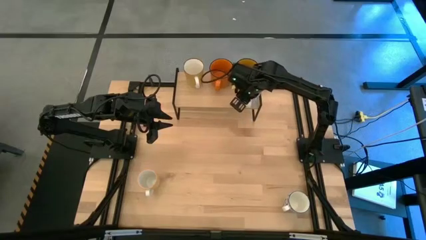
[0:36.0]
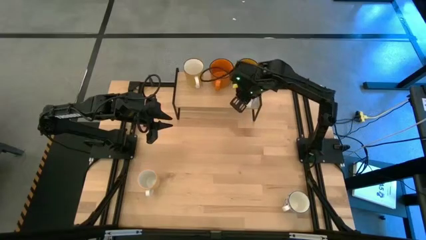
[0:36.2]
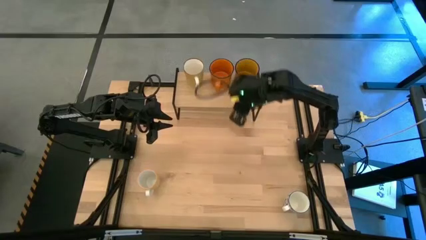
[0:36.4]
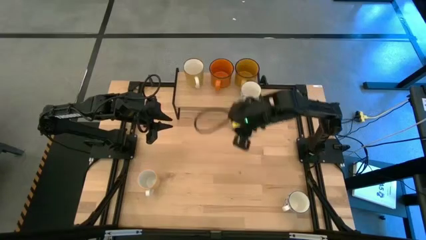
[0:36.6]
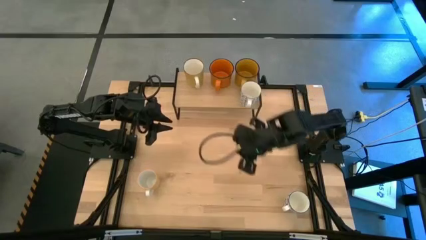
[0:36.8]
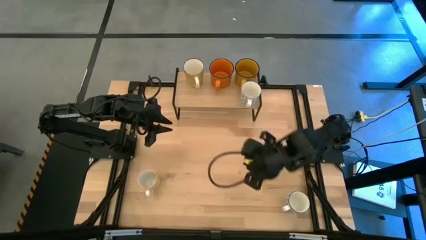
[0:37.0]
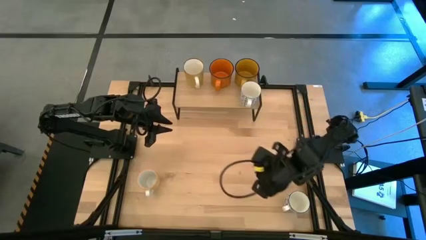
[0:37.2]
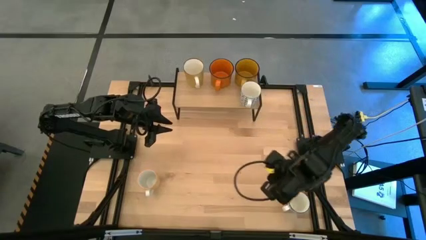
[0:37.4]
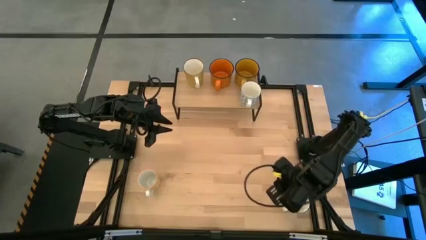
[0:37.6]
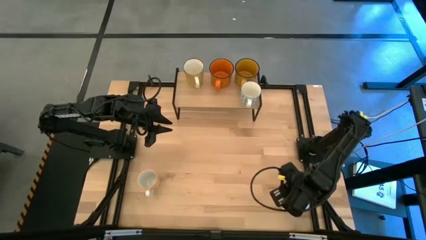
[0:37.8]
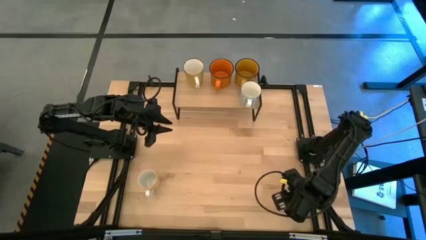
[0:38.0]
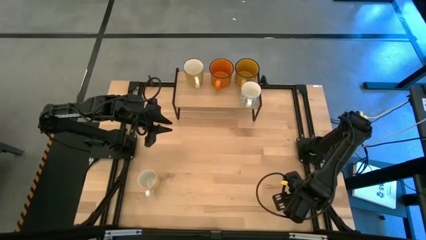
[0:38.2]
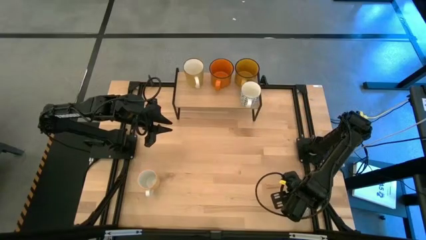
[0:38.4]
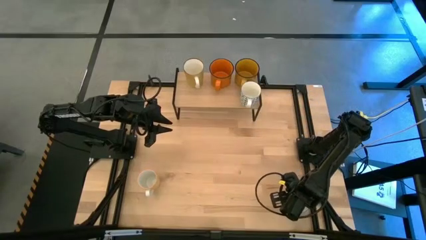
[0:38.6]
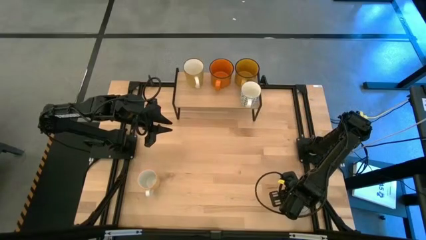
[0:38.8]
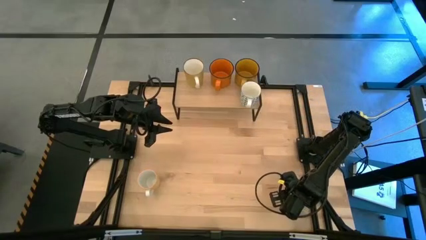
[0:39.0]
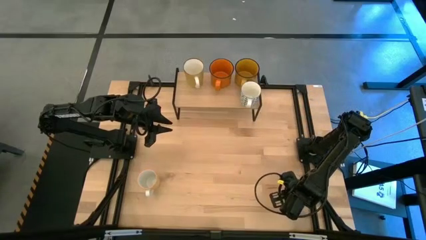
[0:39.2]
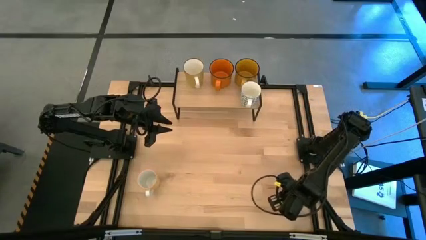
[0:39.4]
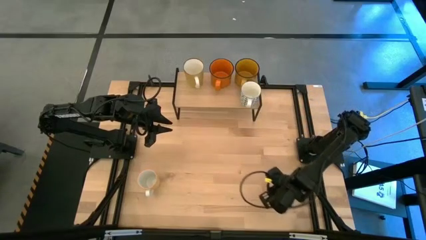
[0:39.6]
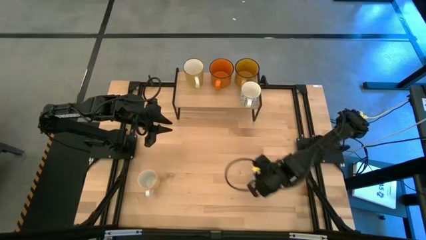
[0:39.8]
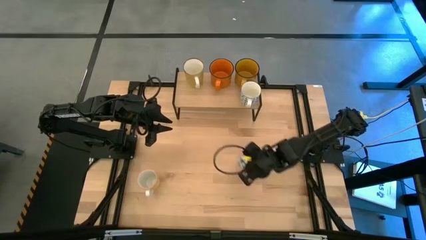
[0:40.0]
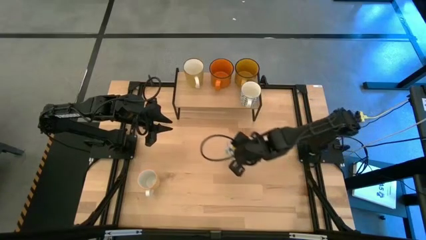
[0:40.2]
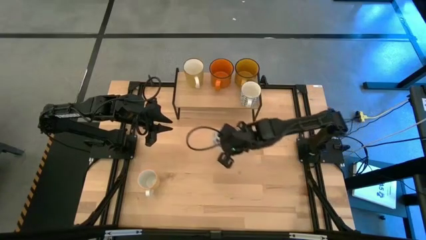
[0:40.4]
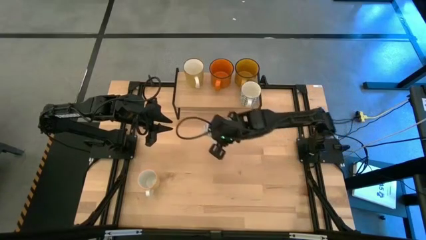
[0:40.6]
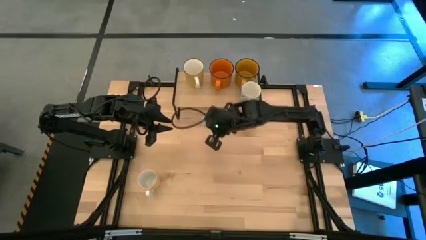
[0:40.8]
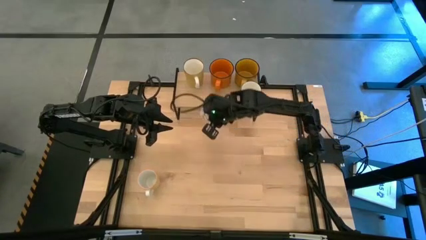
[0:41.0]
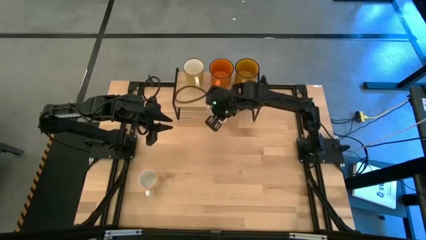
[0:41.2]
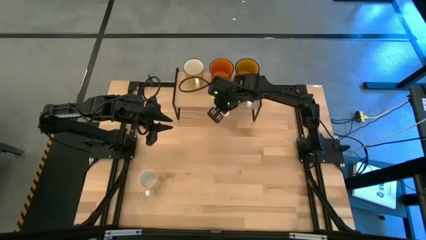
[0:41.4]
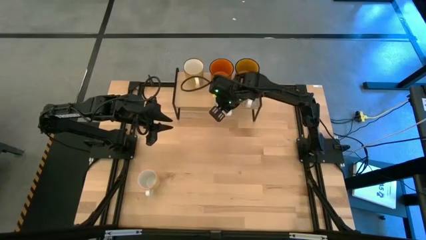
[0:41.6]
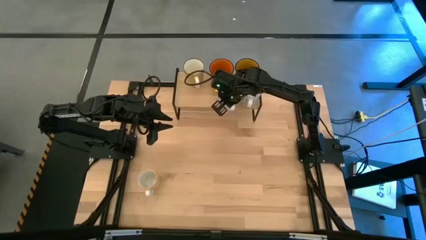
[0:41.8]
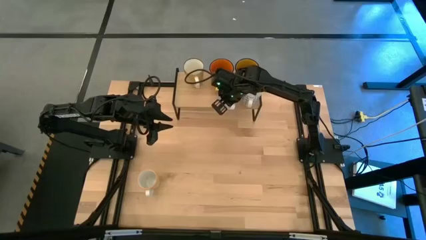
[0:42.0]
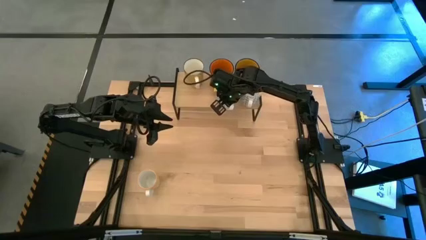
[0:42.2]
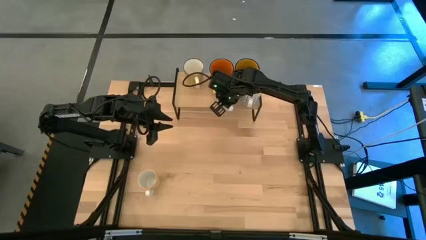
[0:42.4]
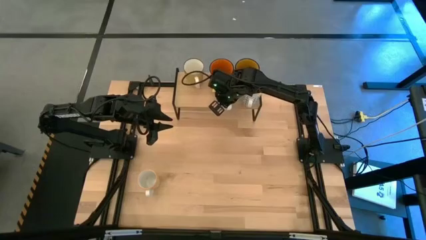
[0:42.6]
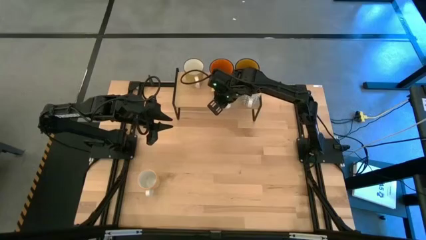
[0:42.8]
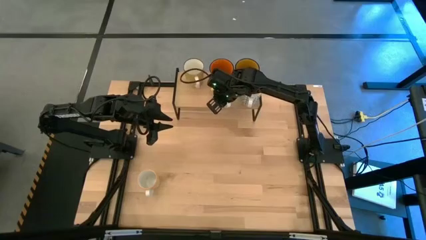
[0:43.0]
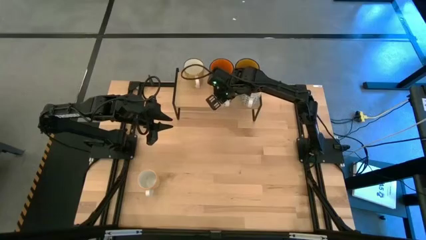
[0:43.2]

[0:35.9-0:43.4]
Task: Place coffee mugs
Put the blue patterned mug on the shelf

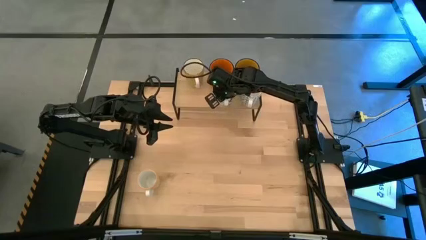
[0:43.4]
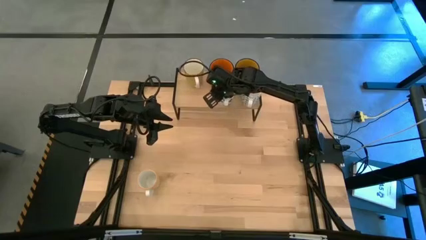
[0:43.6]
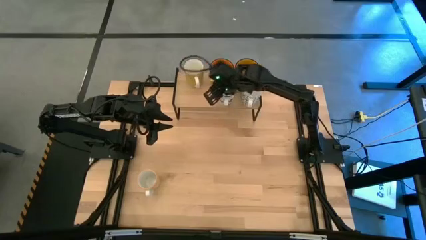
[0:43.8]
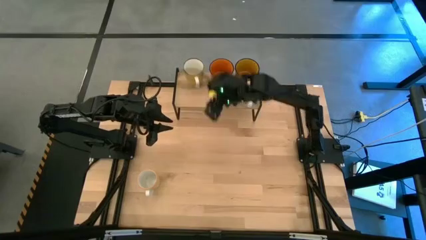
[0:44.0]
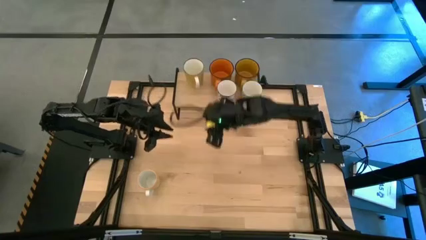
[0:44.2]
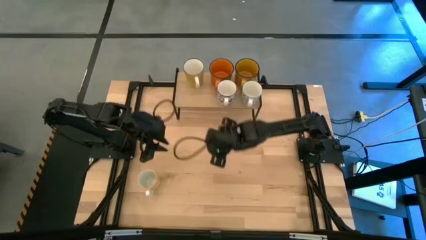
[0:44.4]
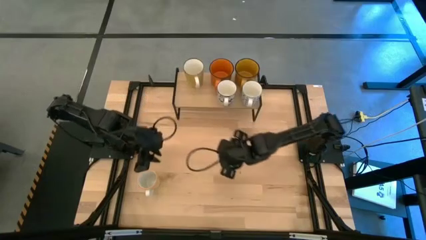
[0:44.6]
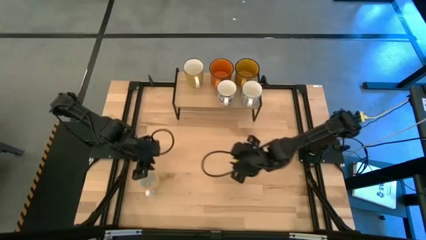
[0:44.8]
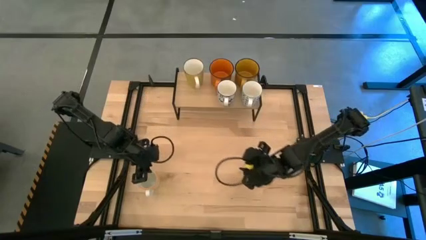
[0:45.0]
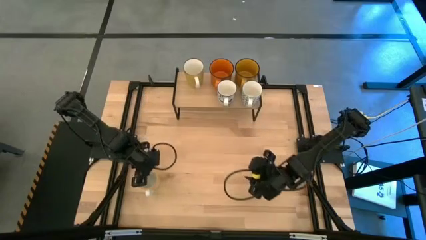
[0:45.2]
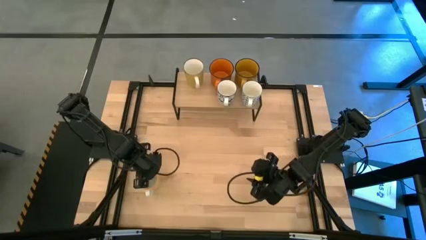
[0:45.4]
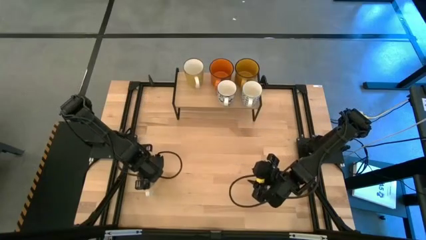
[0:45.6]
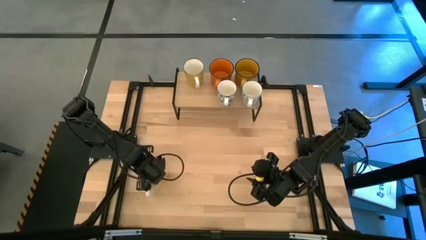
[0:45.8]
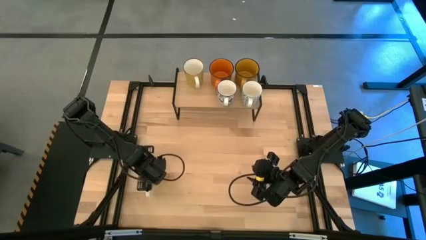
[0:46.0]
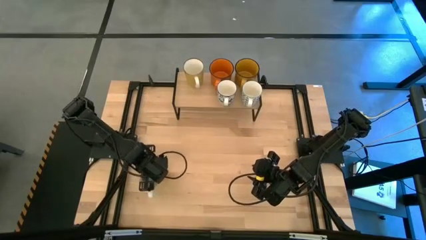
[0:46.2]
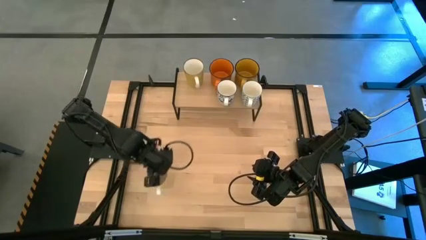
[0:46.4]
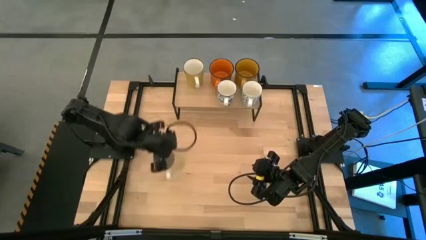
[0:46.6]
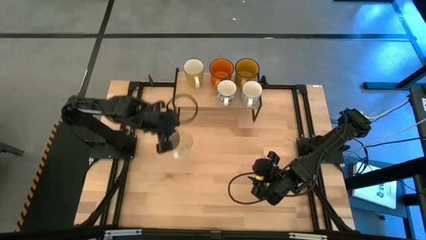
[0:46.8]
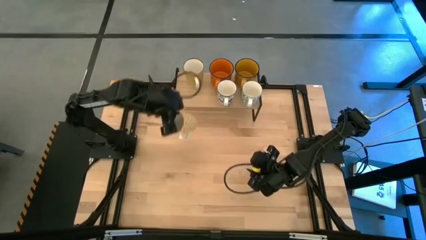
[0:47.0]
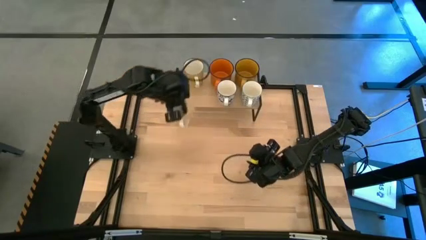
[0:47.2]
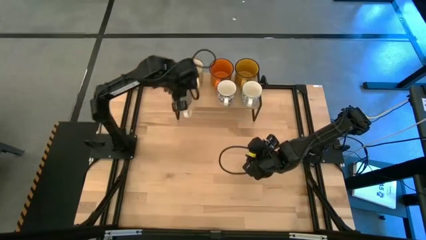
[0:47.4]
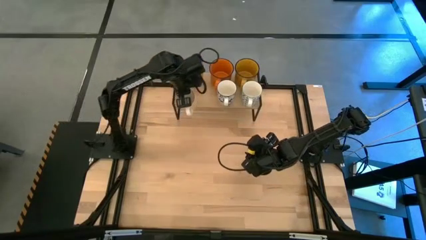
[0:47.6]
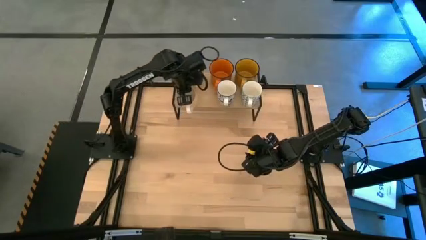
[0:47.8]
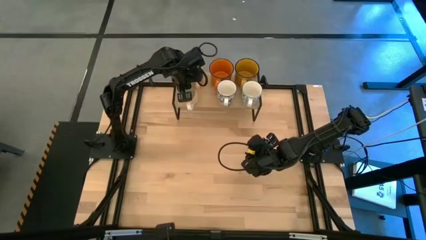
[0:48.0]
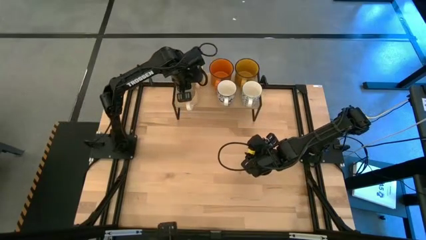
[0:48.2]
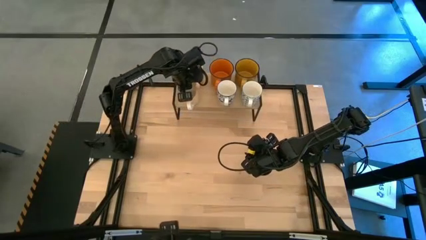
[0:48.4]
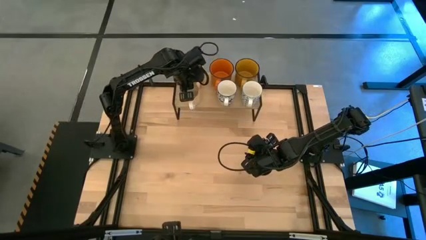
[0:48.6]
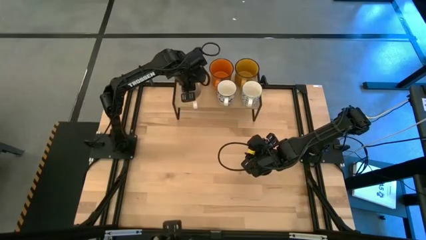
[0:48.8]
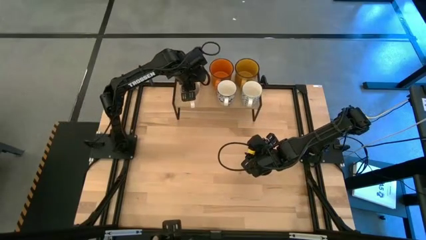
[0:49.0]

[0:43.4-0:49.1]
Put the yellow patterned mug on the shelf

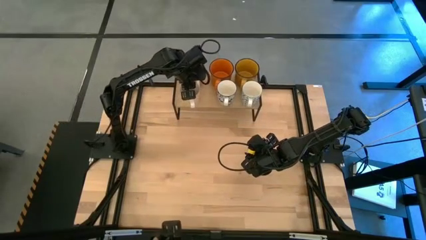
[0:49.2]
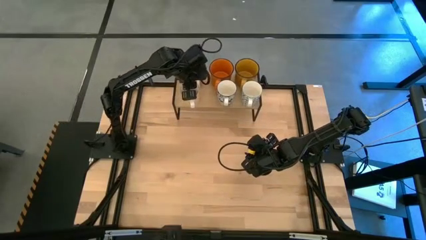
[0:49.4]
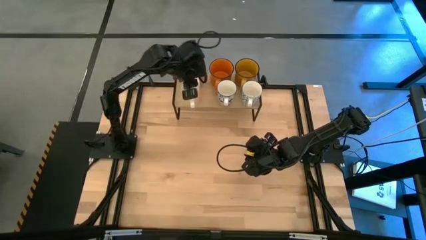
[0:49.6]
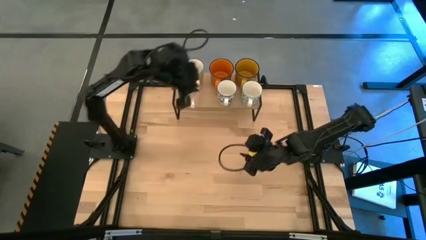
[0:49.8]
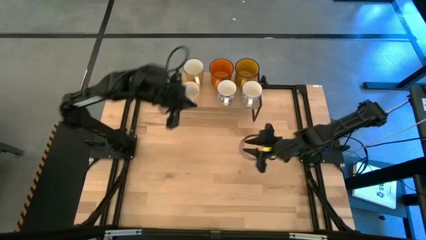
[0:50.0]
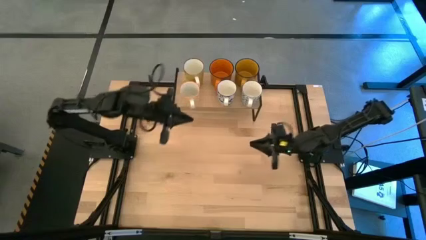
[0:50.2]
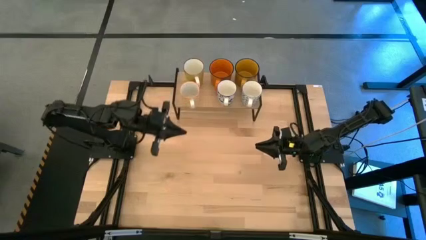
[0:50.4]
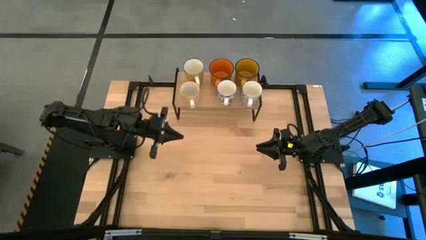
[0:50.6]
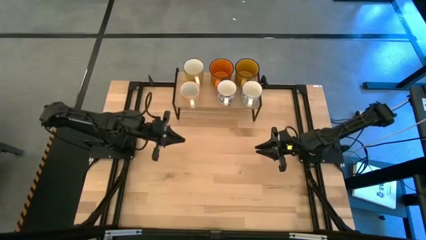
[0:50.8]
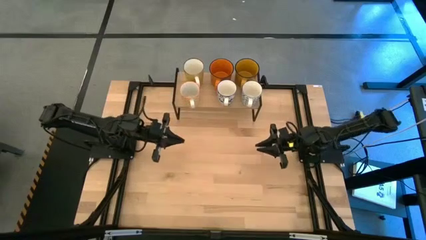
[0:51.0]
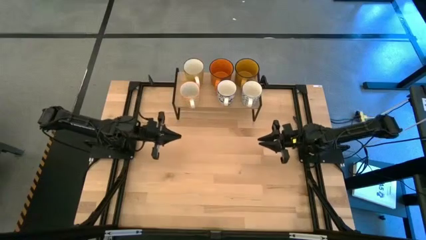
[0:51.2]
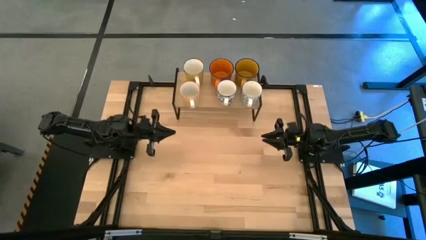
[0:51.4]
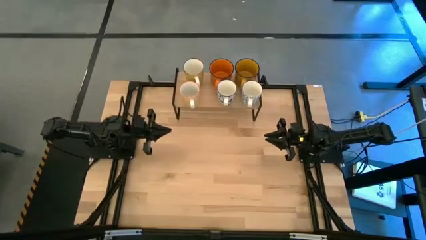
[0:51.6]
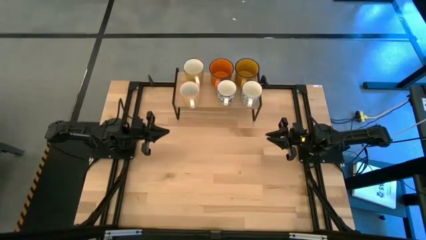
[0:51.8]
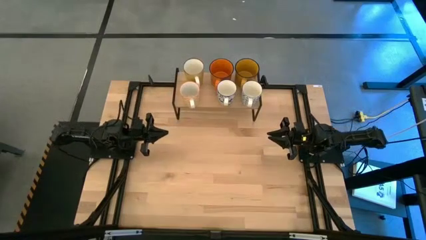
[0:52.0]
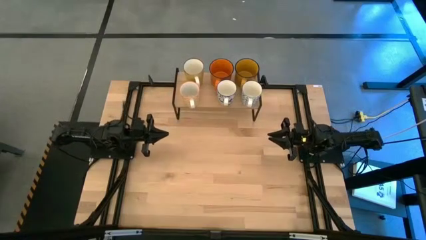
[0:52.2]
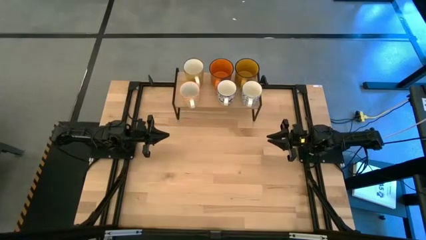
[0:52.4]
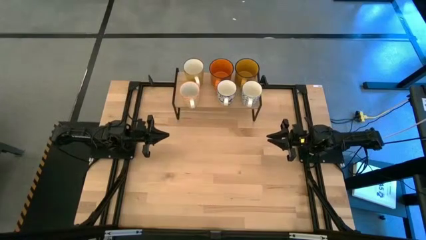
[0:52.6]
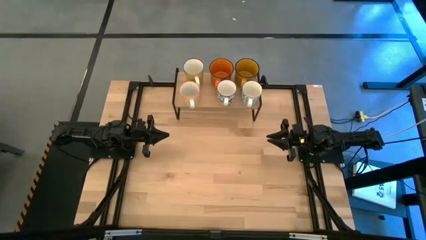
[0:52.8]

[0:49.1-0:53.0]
Return to Home Position
